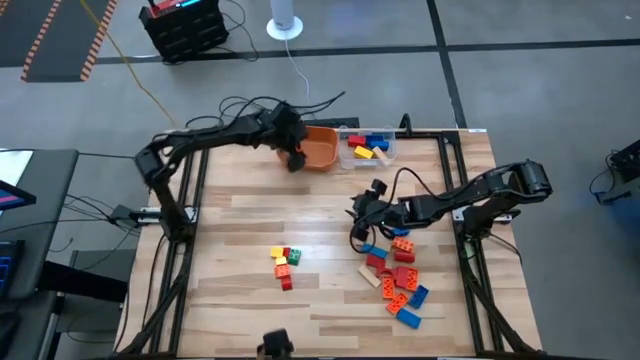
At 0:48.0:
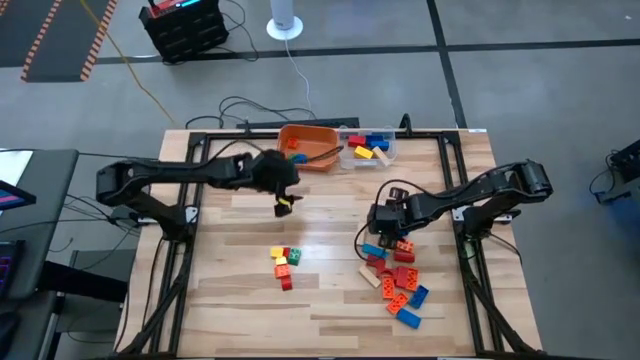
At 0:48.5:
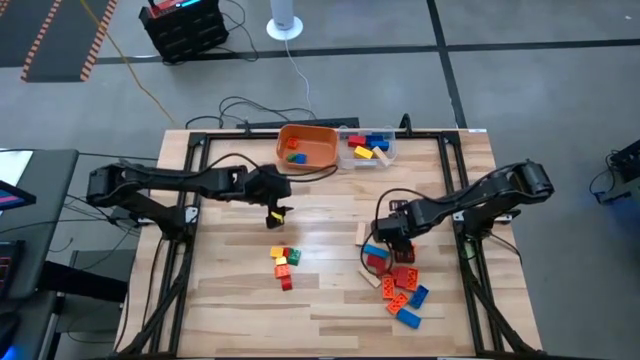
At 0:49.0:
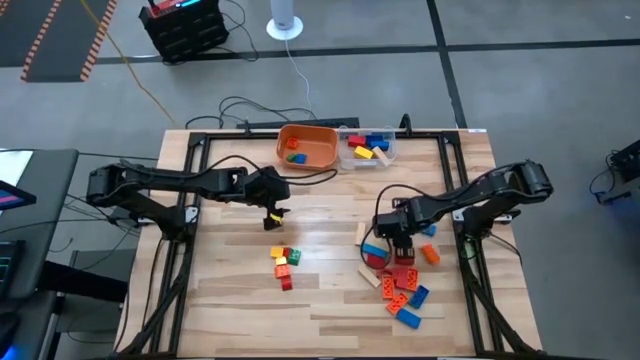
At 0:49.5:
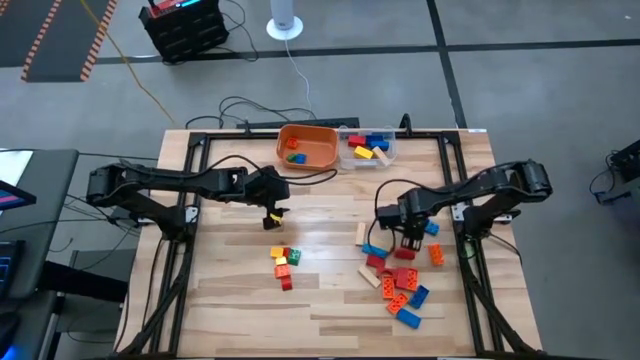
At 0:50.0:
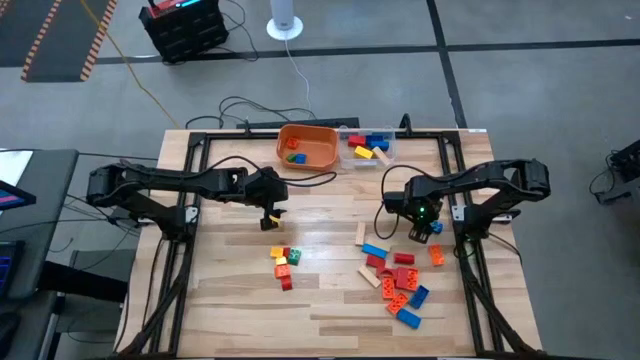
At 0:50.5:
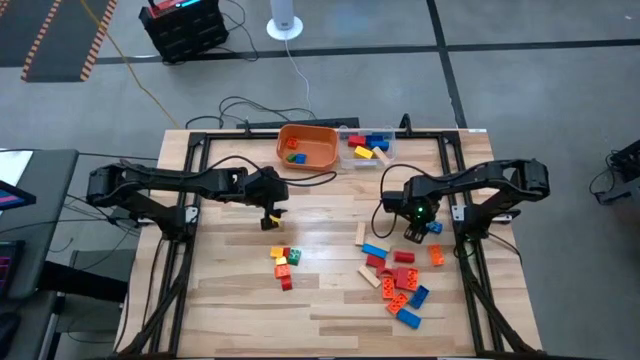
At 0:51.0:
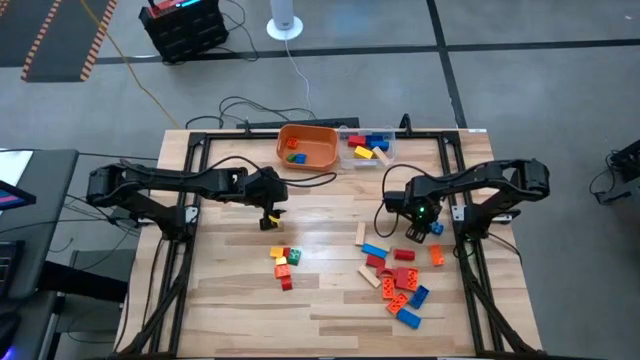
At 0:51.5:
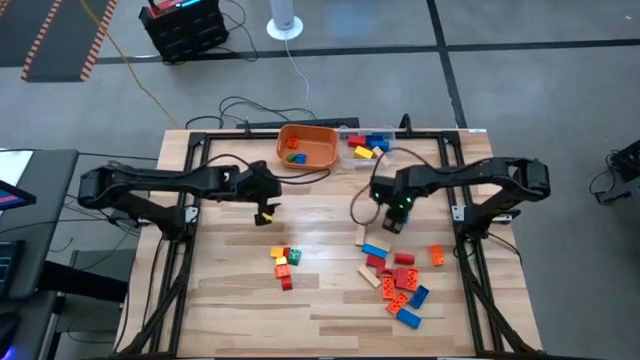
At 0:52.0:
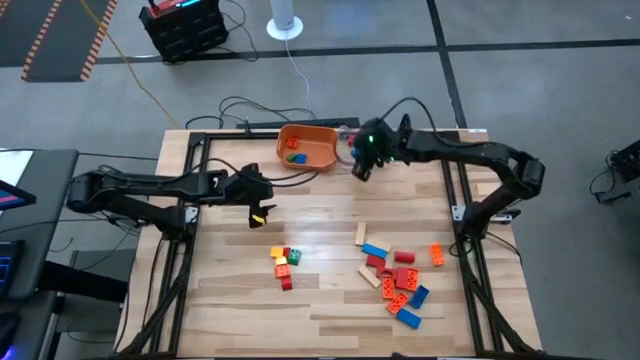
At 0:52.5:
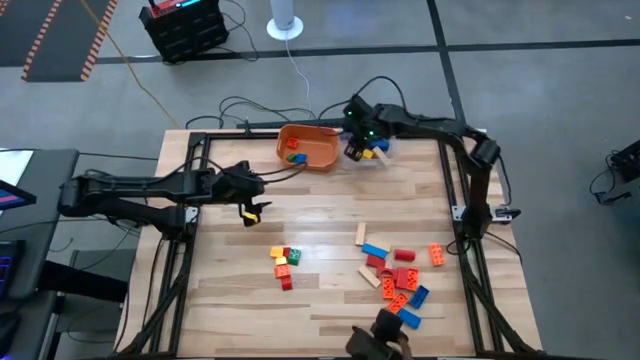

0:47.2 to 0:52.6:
Task: Sort blocks by size
Put the top blue game piece into the transparent bin

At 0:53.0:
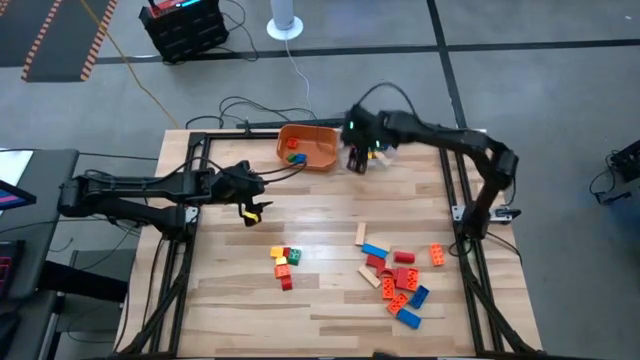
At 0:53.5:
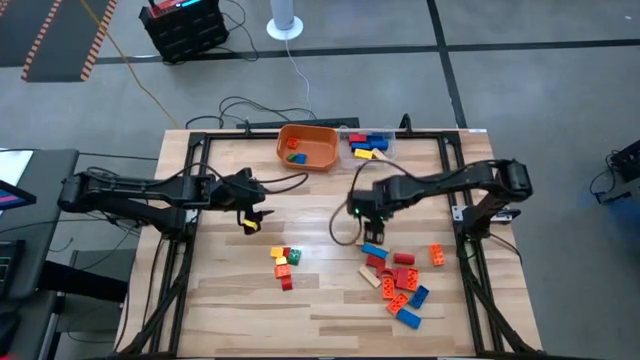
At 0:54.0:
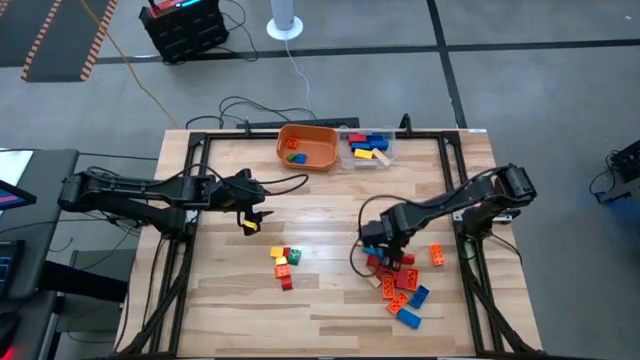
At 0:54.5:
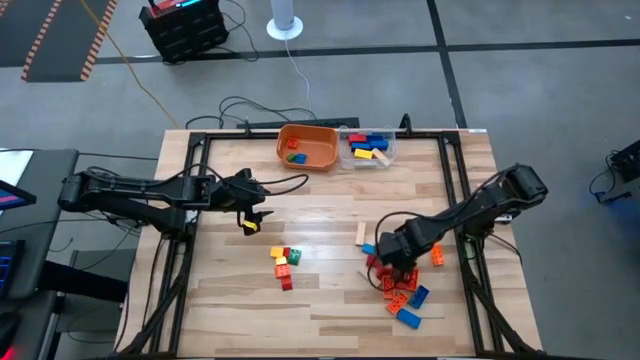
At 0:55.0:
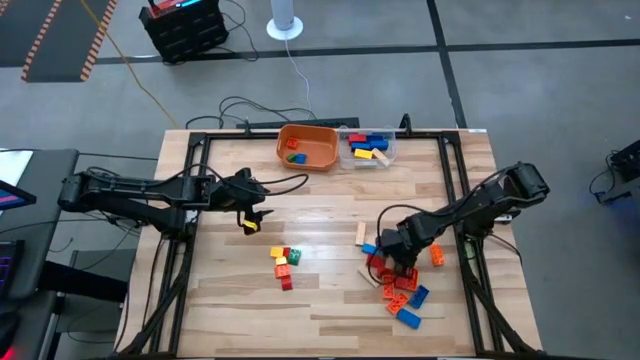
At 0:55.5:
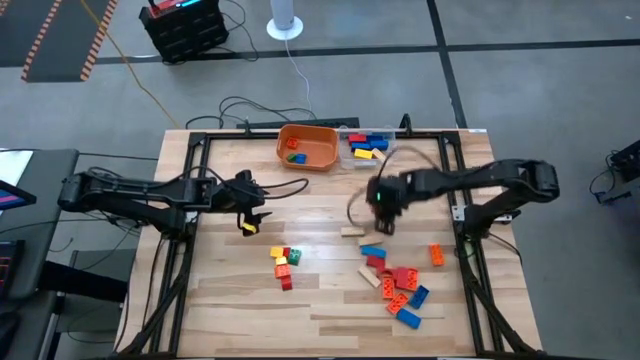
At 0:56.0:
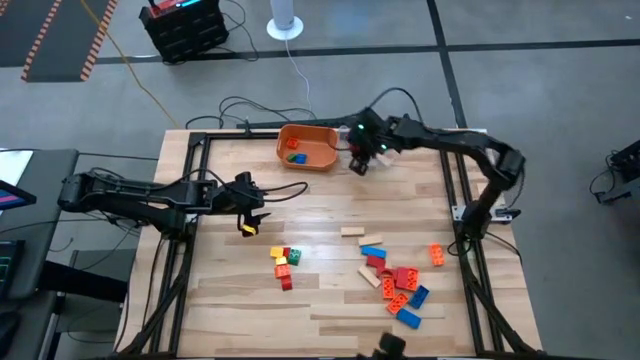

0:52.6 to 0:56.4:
Put the red cylinder block into the transparent bin

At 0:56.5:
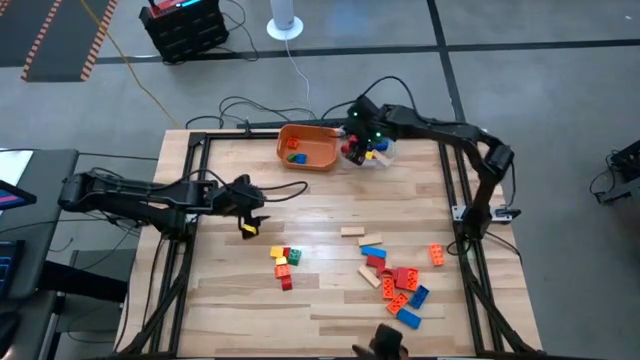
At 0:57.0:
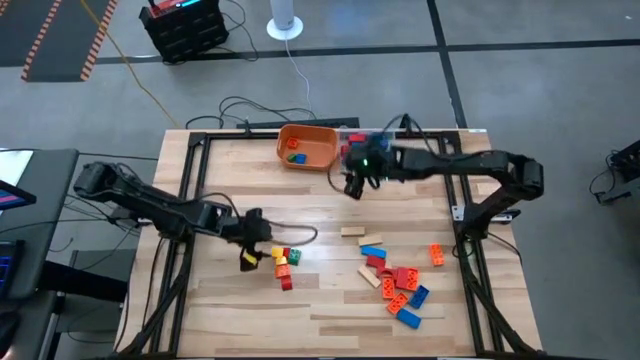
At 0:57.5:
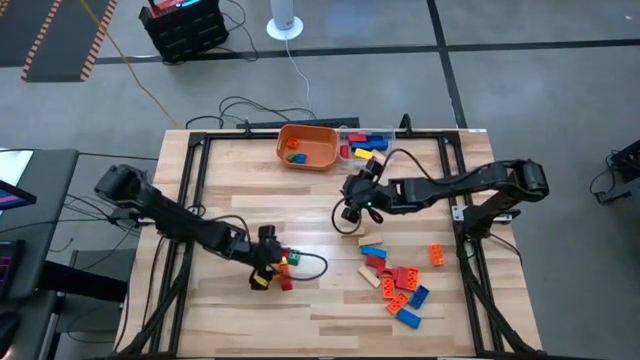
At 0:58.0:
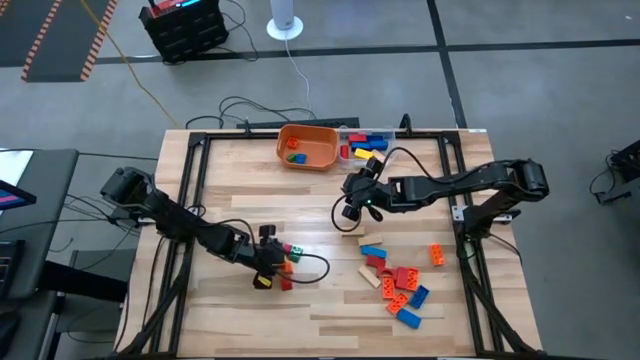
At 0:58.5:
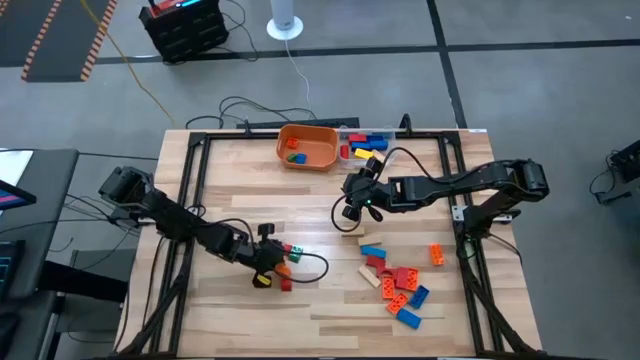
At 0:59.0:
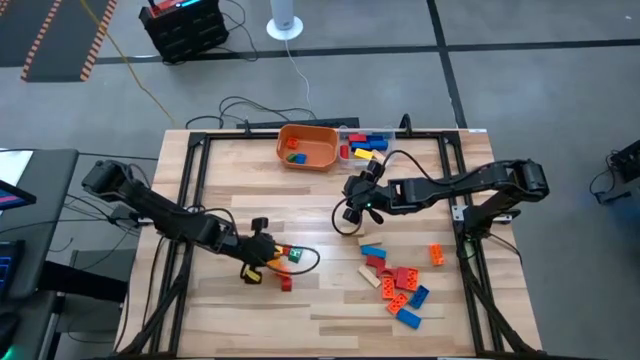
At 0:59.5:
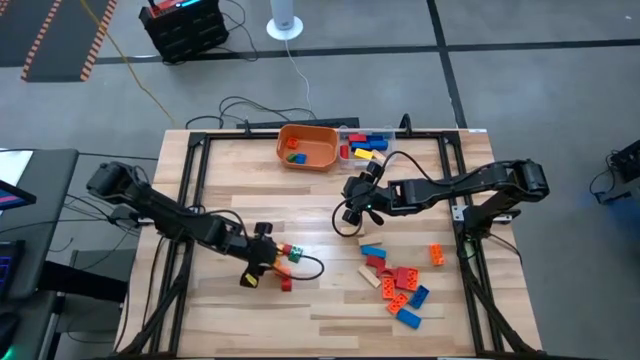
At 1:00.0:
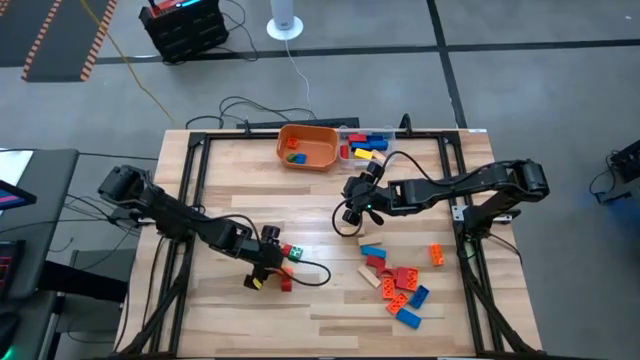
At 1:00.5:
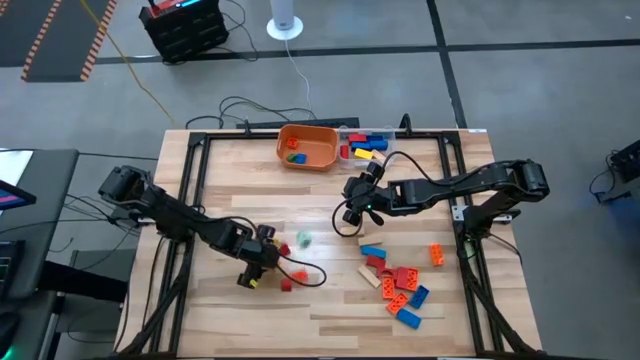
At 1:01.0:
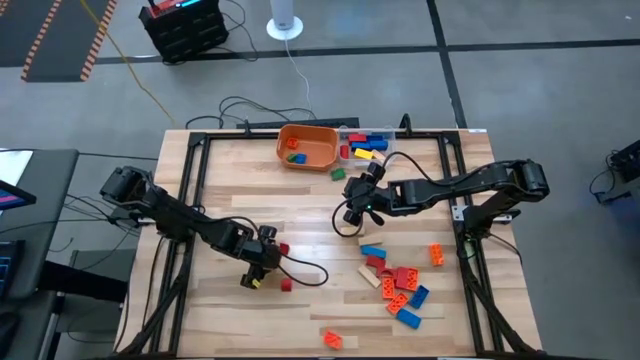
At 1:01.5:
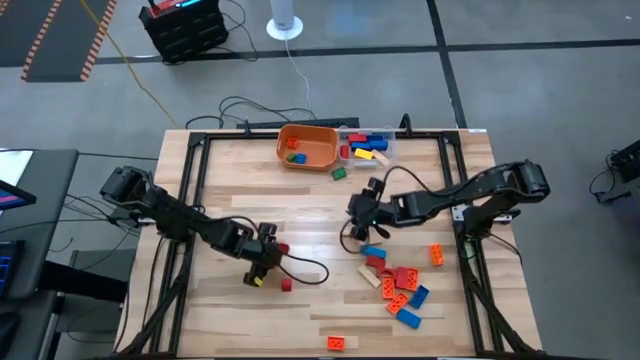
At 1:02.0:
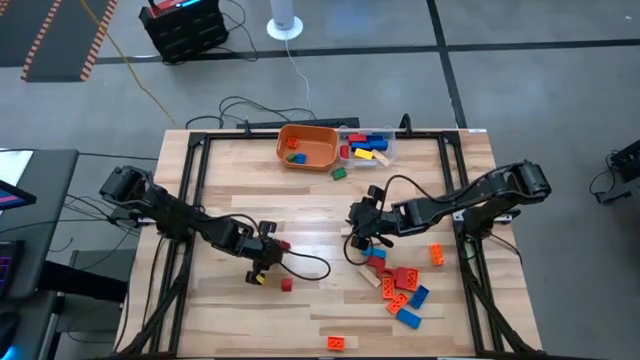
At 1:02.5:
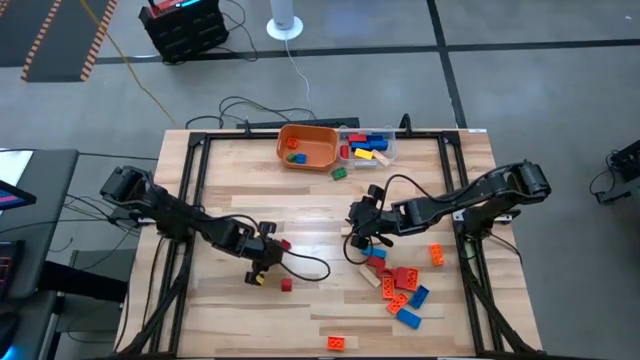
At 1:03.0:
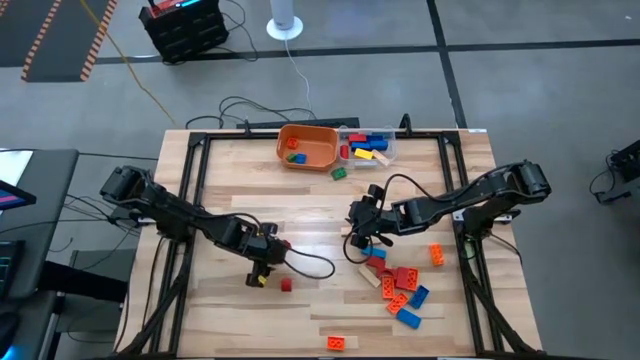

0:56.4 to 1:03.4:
Put the bottom yellow small game piece into the orange bin

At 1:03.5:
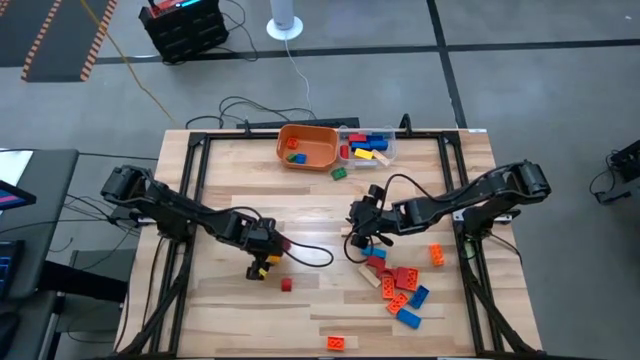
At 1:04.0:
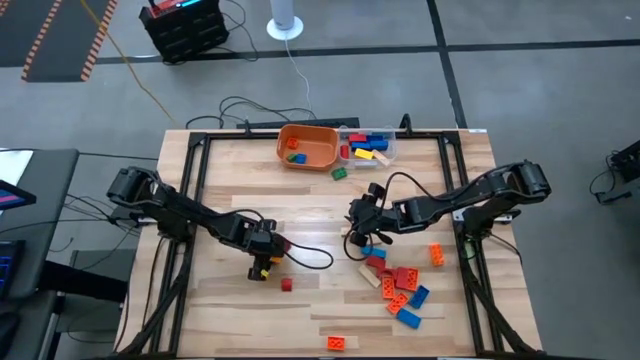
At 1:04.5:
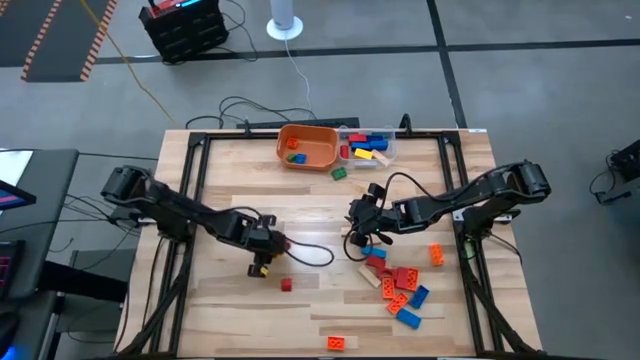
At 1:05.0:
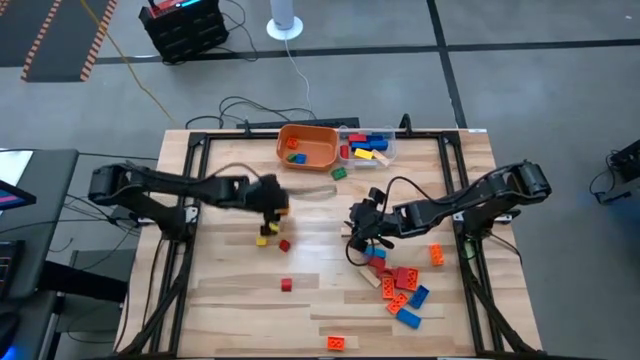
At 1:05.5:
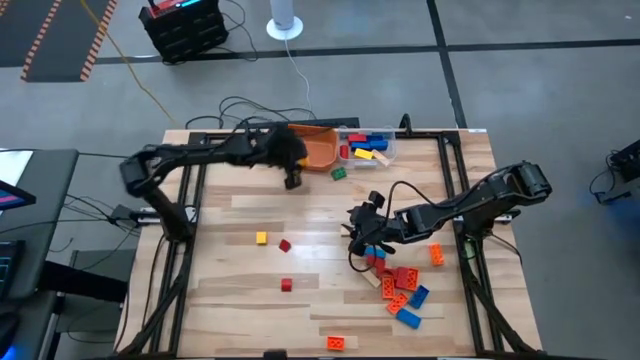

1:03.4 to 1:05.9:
Put the yellow small game piece into the orange bin

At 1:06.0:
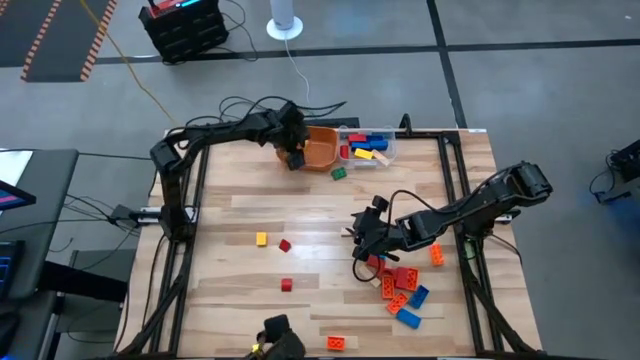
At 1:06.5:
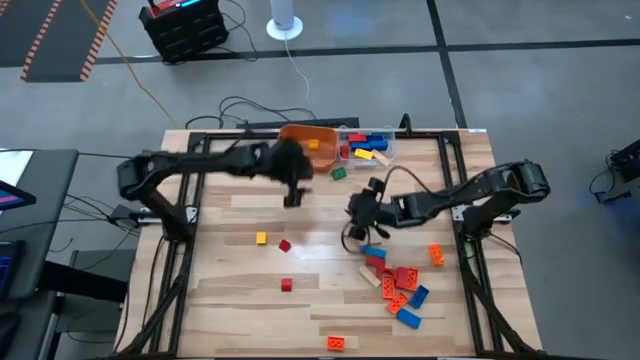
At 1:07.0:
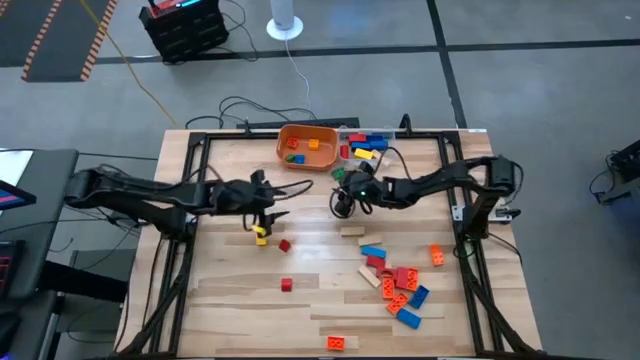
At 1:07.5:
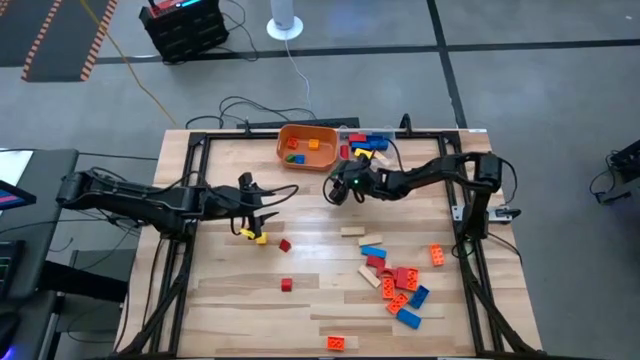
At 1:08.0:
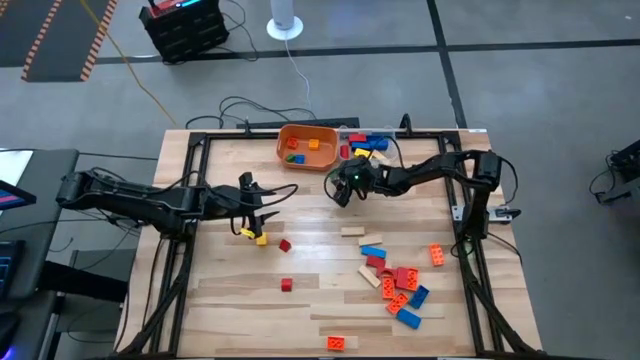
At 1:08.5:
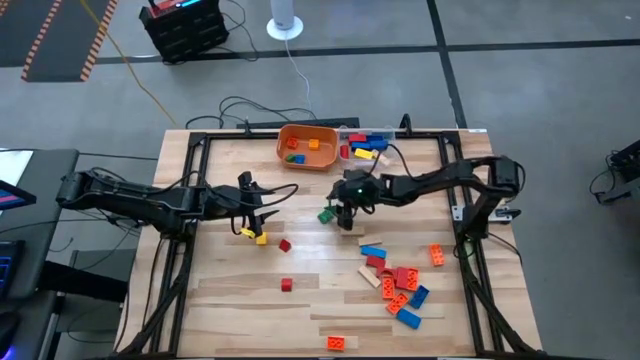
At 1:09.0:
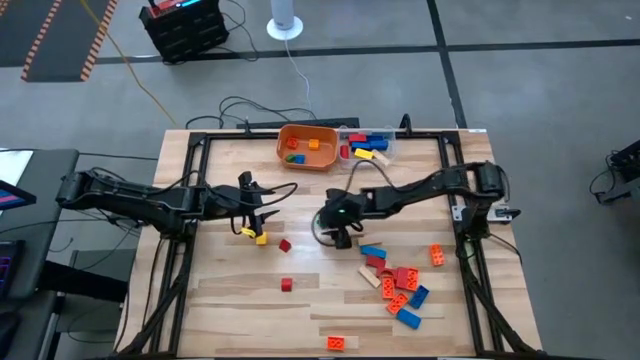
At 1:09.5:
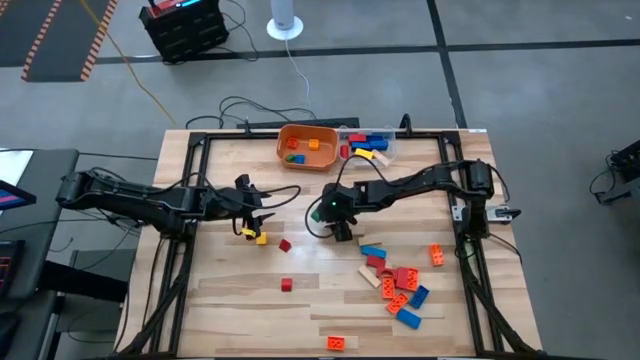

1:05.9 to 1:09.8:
Move the green small game piece to the center
